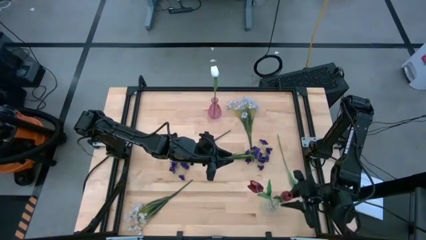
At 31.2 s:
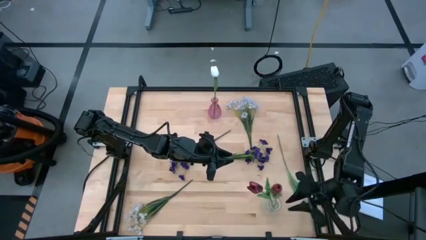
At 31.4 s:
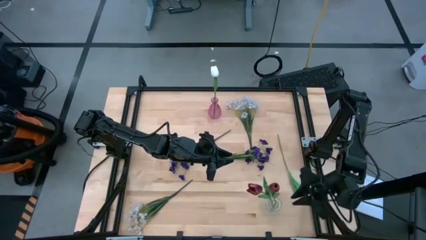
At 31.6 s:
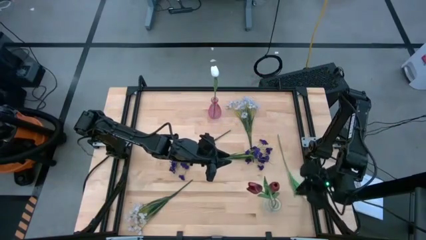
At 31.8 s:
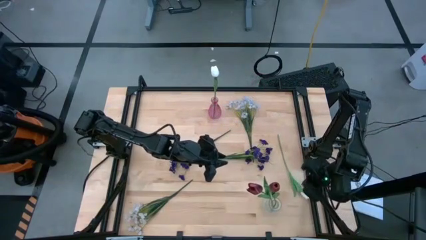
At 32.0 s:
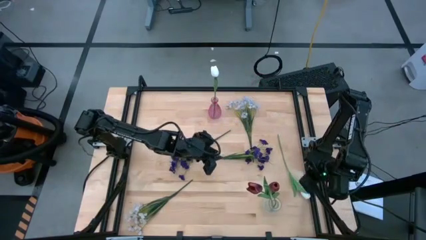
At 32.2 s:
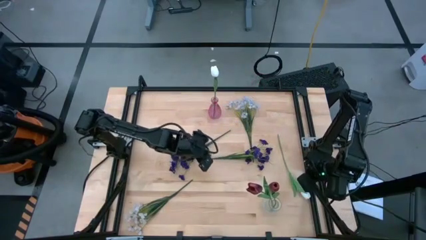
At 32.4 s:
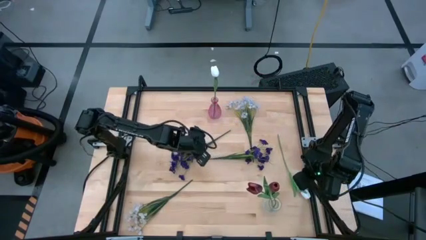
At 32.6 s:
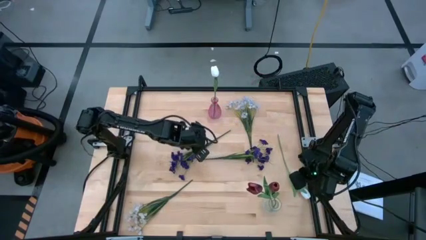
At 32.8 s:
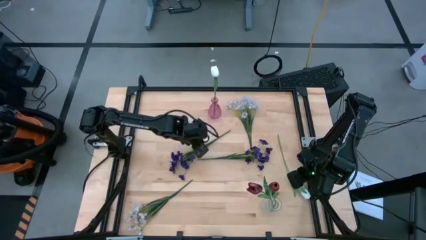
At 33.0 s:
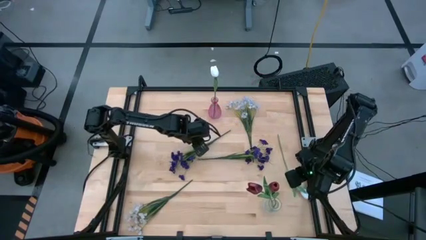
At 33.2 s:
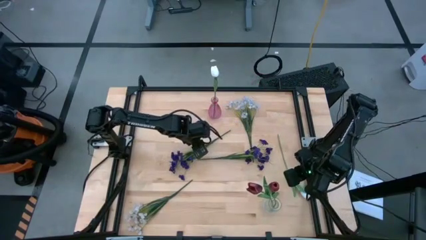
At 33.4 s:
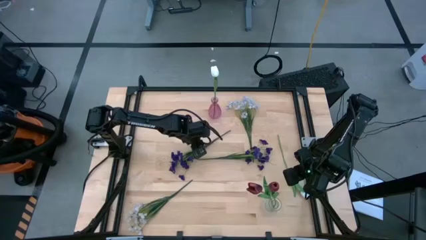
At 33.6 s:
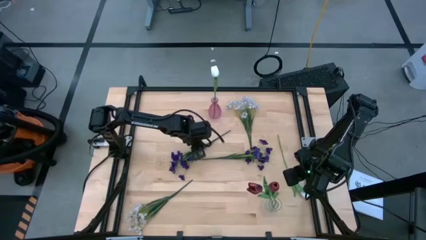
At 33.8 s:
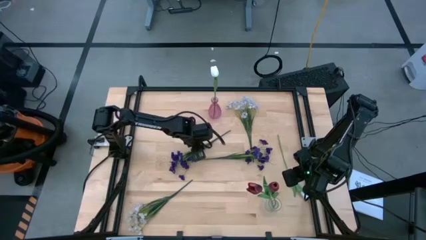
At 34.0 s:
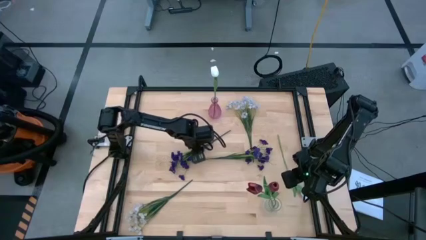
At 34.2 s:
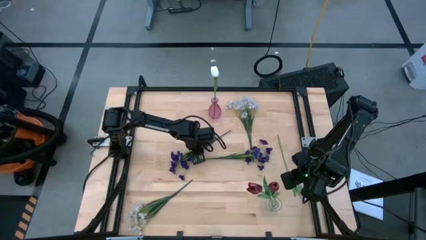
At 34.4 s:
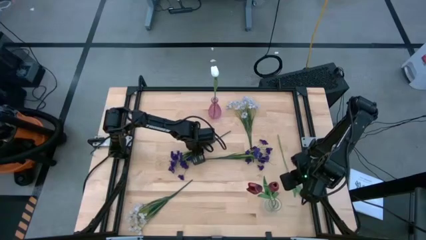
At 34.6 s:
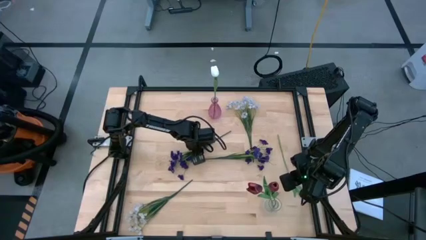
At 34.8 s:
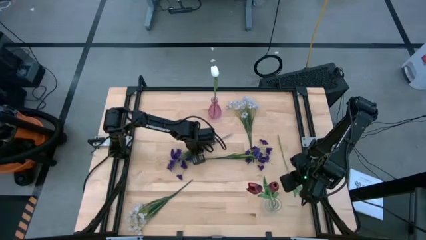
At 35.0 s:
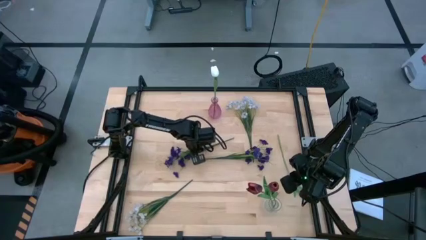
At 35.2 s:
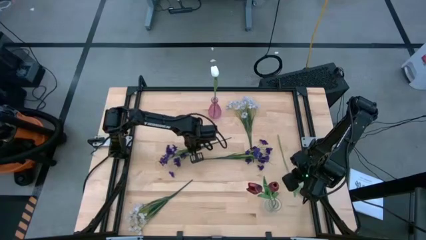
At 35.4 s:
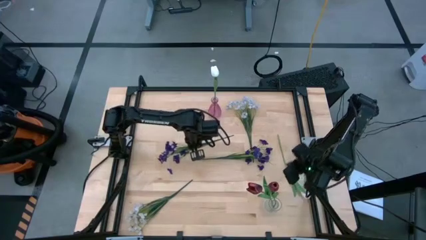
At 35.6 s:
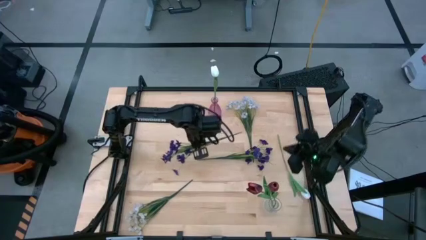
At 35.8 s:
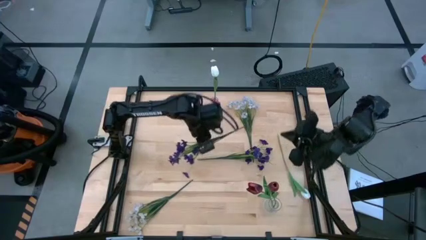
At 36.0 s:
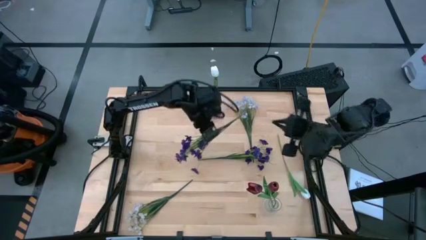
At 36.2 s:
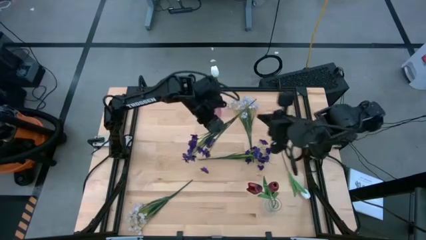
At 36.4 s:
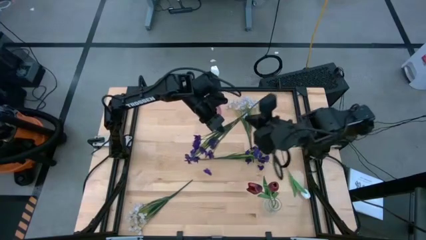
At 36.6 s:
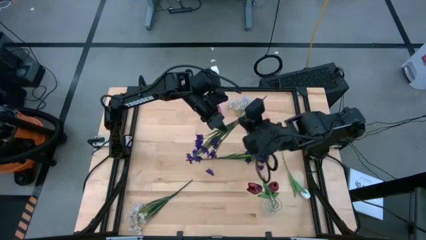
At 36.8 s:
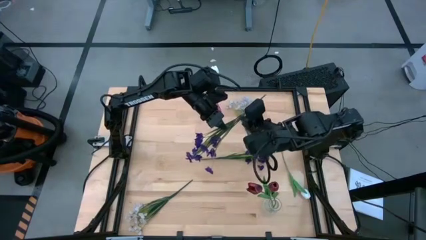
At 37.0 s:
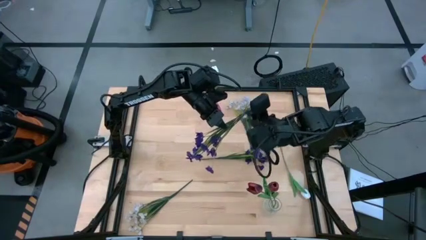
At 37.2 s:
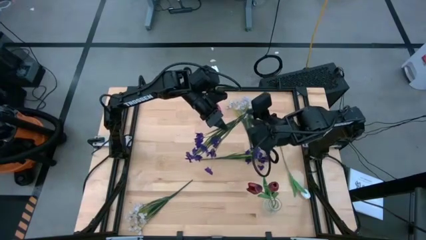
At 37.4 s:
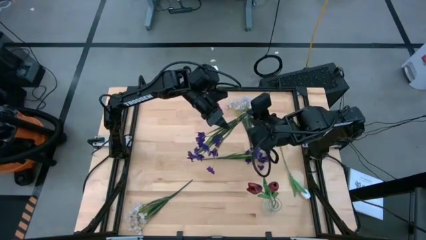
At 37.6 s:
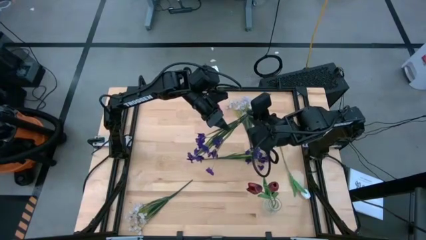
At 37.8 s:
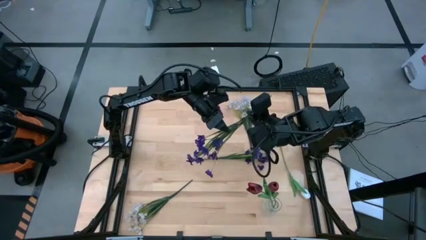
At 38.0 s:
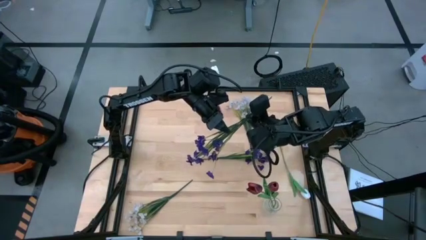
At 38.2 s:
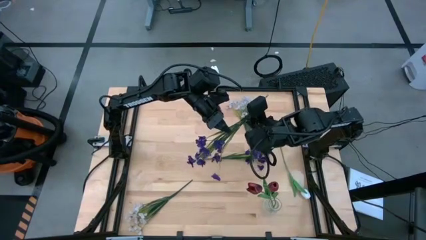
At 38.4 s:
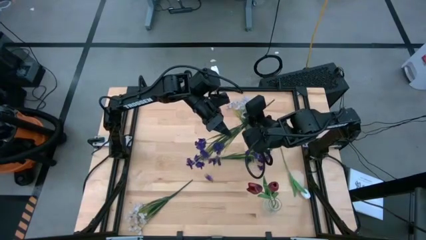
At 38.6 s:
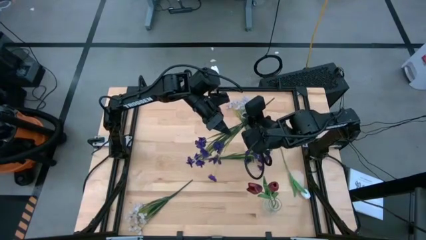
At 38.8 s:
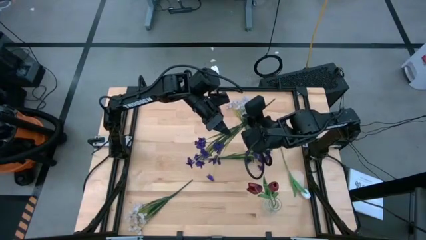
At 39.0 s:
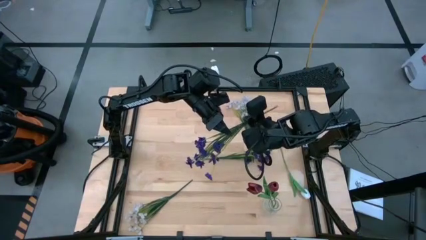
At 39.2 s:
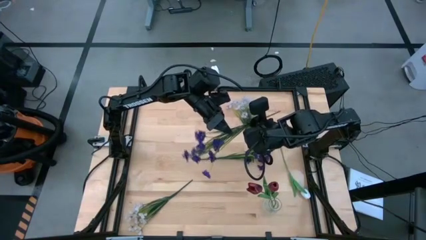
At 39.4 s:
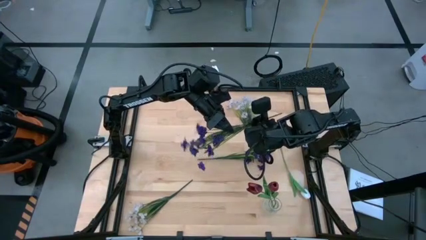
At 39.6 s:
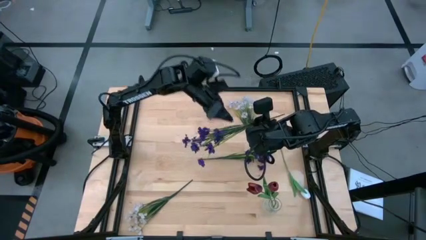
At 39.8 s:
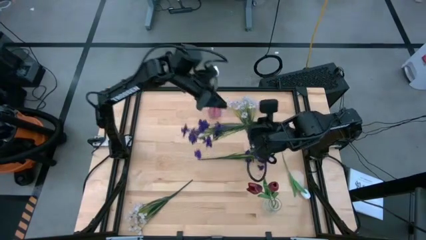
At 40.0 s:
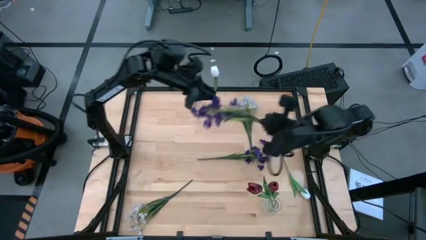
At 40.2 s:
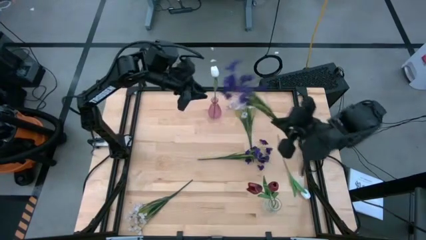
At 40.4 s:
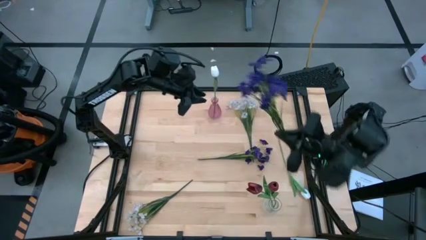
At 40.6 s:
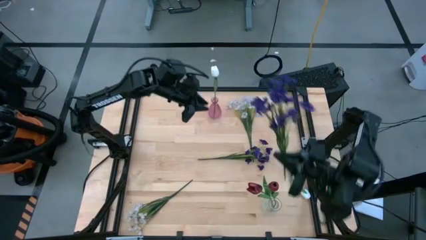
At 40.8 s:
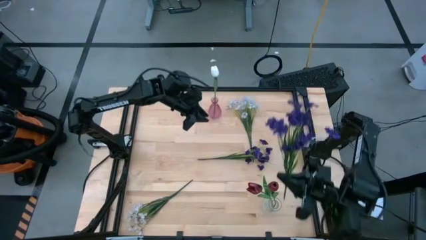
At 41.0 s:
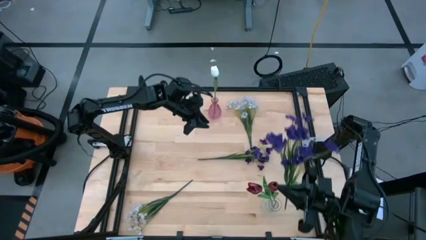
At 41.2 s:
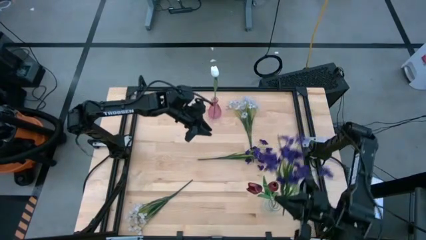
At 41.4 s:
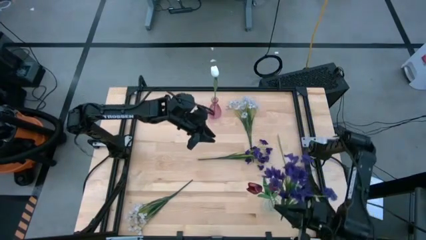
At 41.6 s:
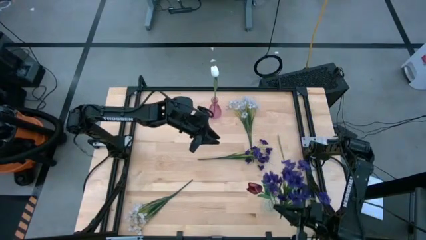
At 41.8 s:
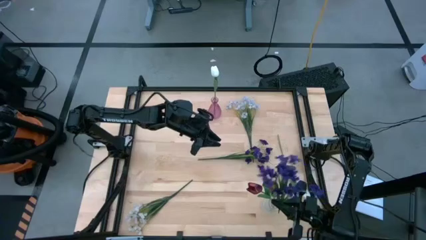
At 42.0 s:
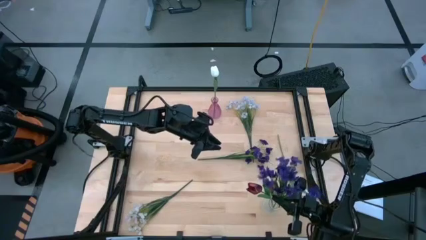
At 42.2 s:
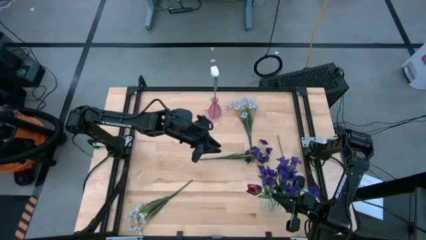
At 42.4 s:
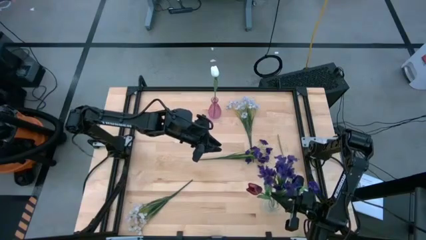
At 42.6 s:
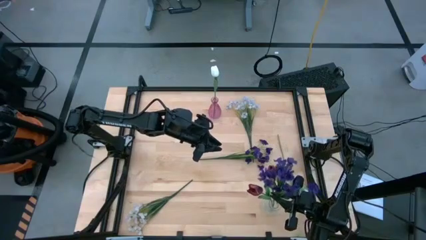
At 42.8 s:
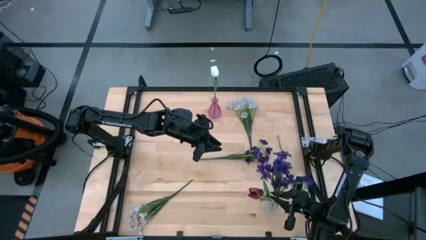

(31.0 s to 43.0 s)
Task: Sort flowers into vase by color
Put the left purple flowers into the transparent vase

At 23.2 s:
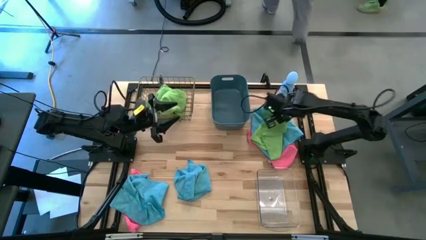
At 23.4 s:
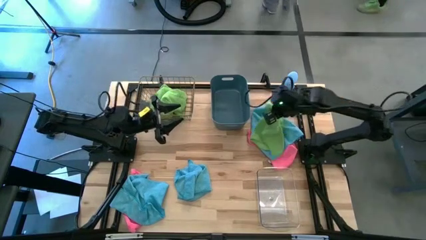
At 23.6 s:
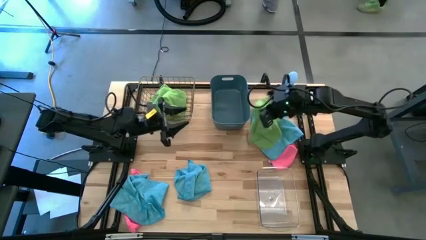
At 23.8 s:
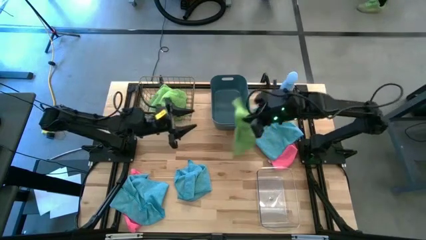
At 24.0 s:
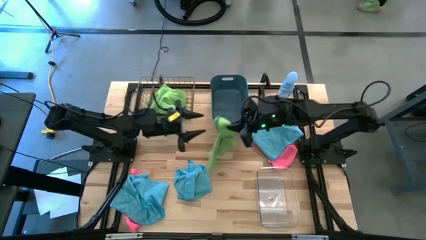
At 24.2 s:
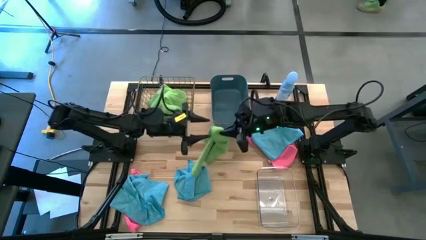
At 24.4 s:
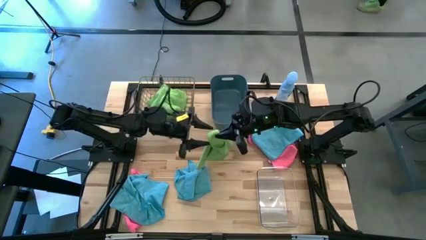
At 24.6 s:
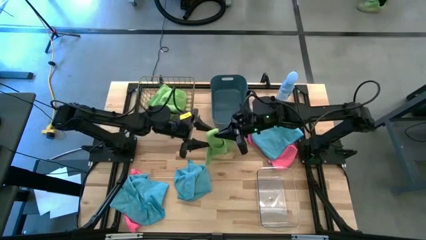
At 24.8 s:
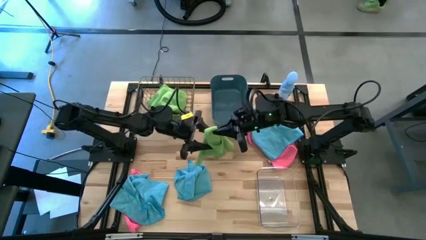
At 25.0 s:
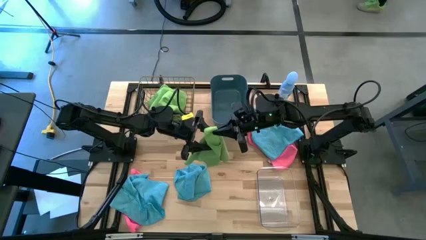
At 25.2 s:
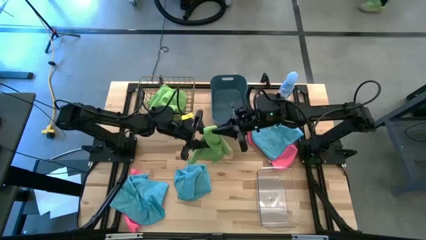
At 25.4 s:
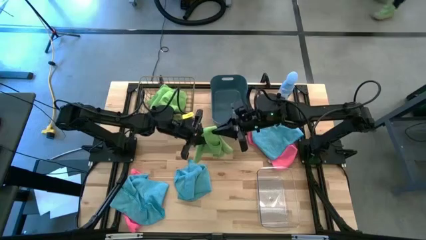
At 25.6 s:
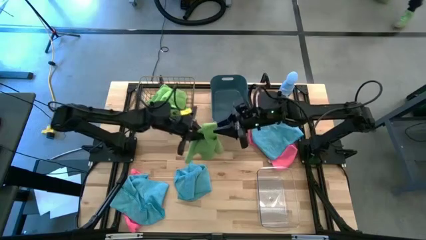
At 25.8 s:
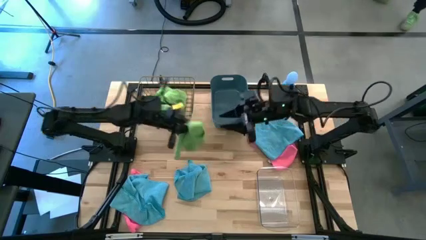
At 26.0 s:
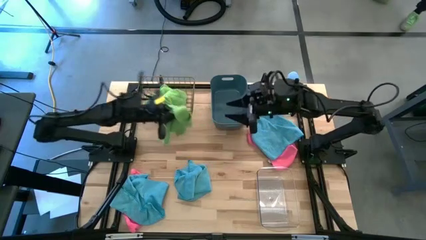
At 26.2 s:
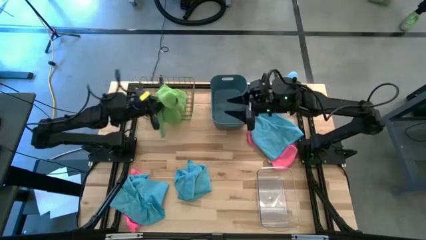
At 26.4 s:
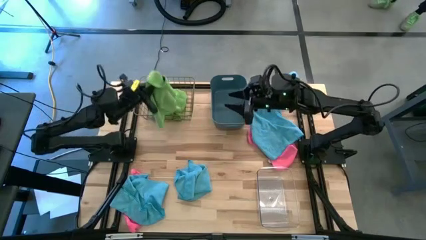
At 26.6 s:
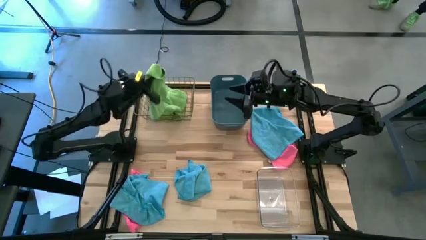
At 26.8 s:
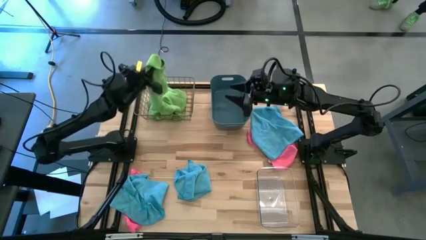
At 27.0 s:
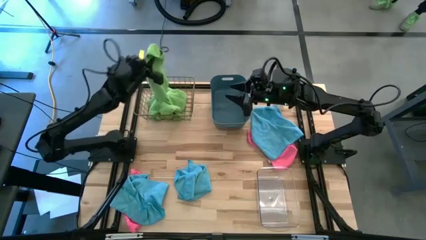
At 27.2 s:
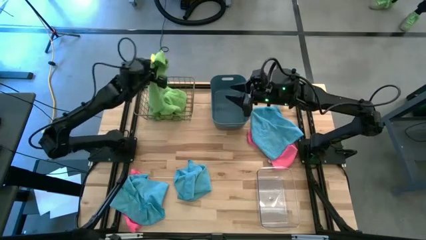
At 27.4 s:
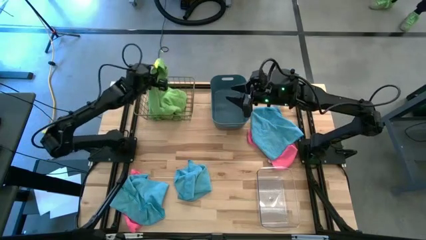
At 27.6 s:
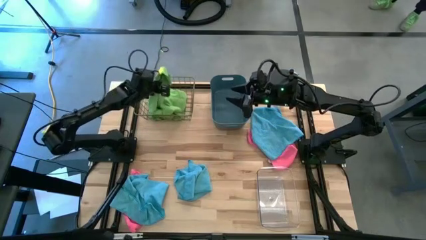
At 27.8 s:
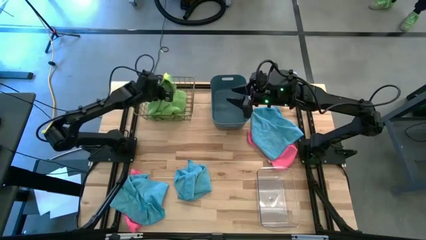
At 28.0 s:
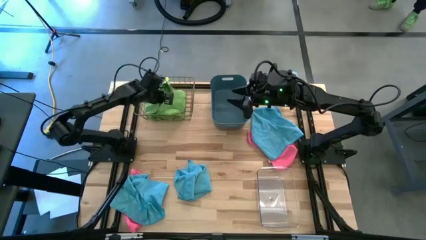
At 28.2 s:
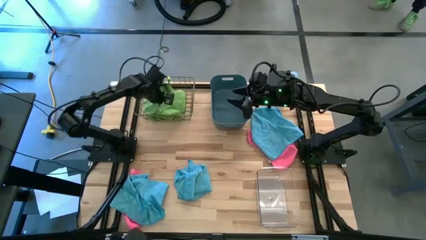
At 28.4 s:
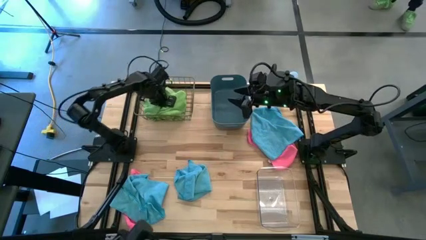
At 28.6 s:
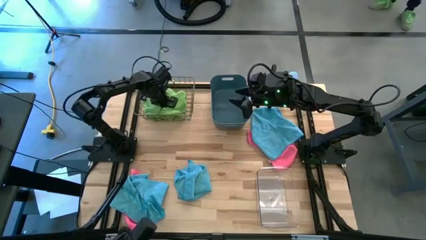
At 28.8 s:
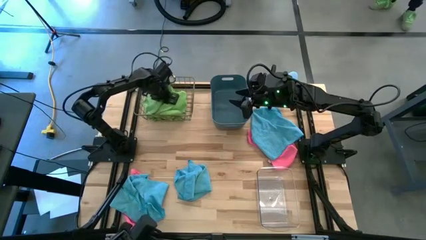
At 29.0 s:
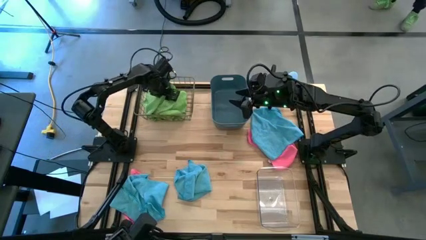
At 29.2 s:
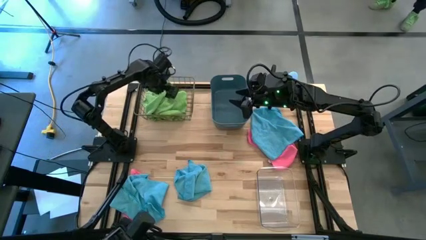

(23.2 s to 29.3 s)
Task: Sort microfiber towel by color & place in baskets
Put the green microfiber cloth into the wire bin
